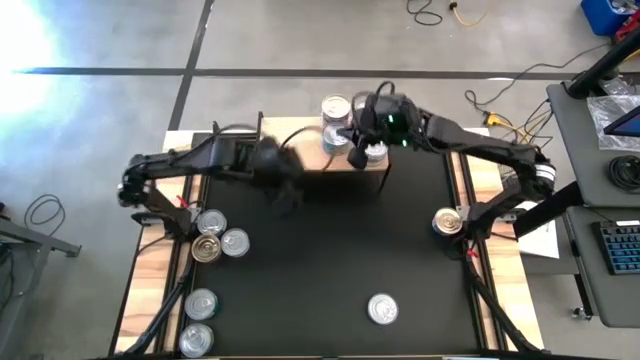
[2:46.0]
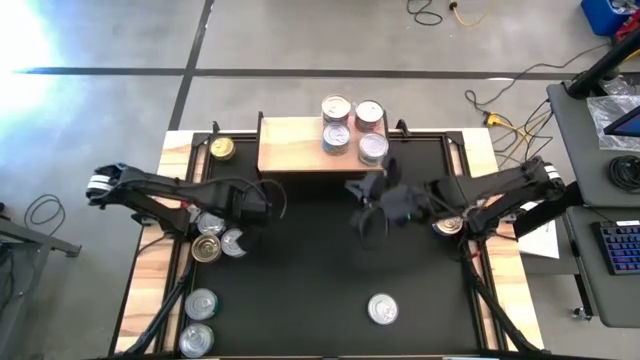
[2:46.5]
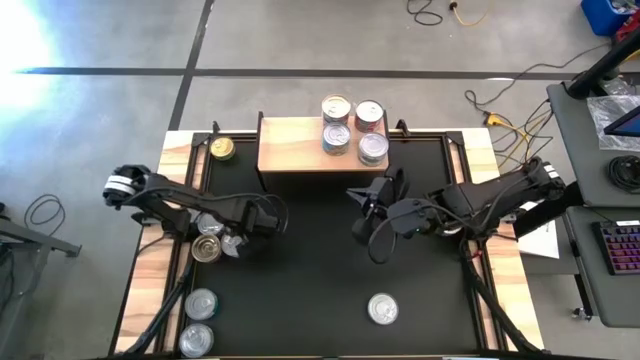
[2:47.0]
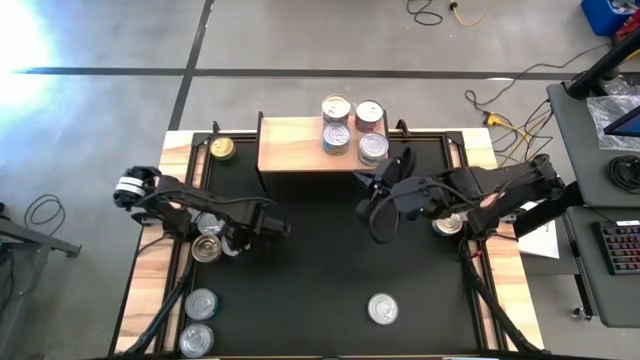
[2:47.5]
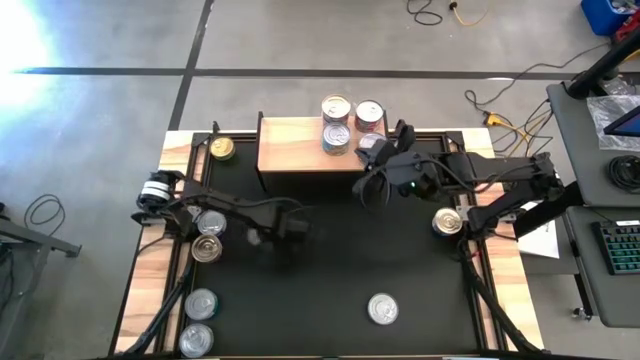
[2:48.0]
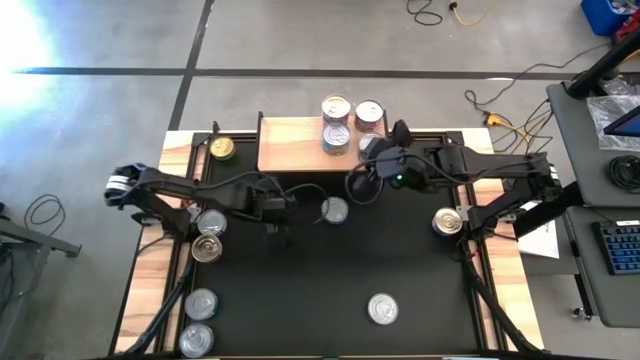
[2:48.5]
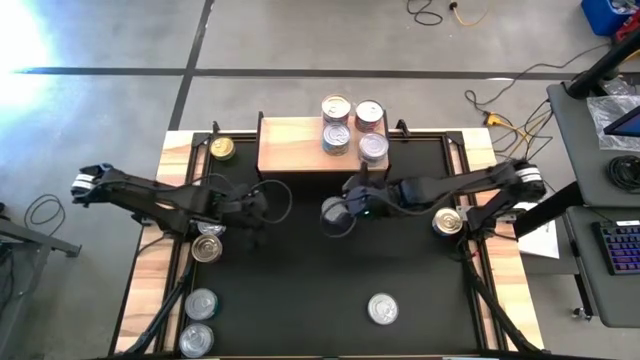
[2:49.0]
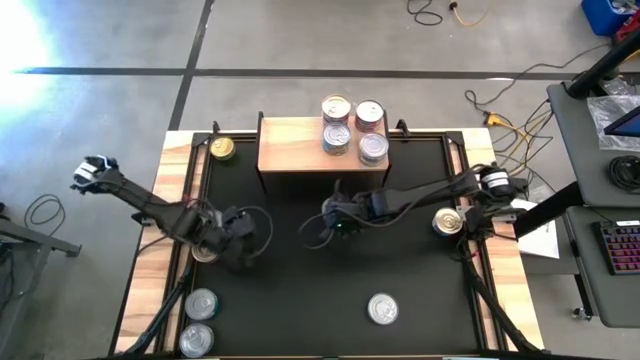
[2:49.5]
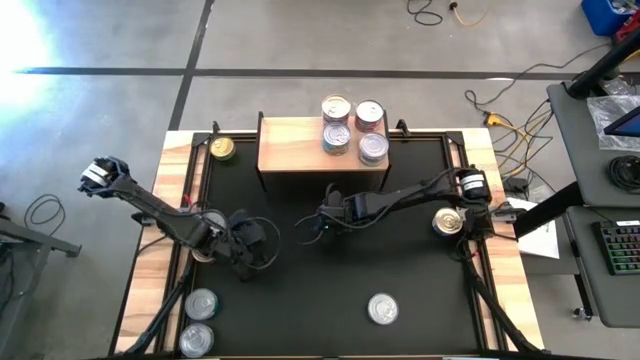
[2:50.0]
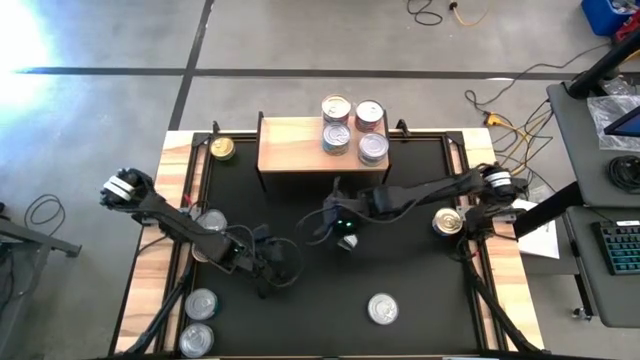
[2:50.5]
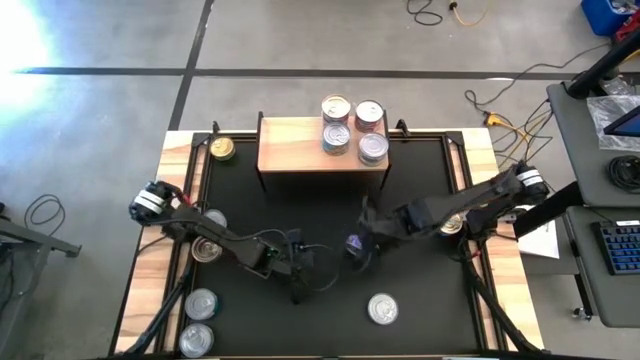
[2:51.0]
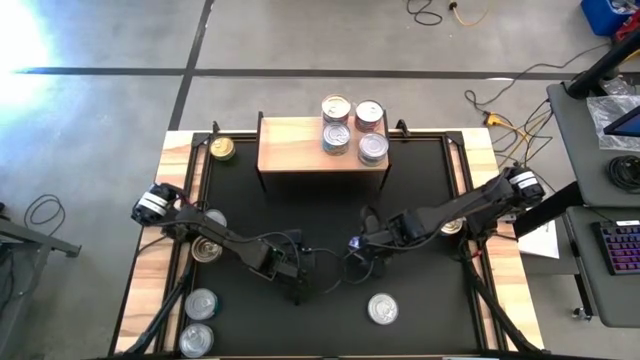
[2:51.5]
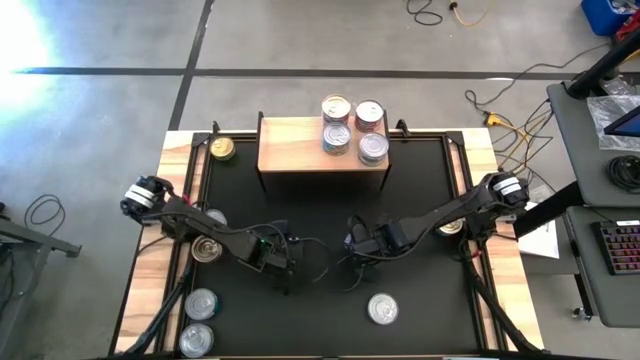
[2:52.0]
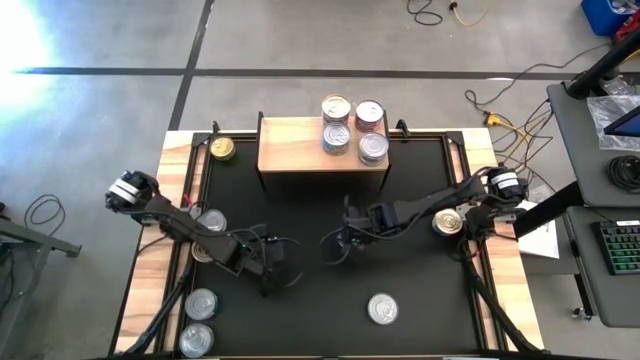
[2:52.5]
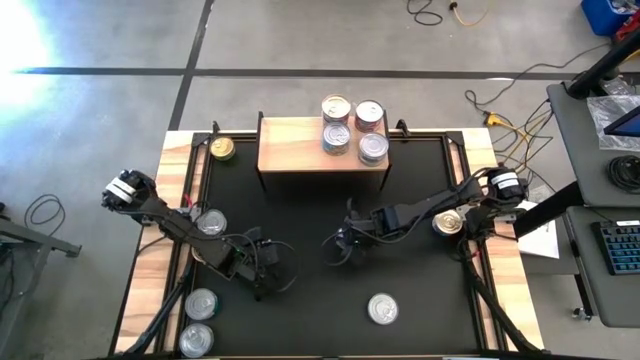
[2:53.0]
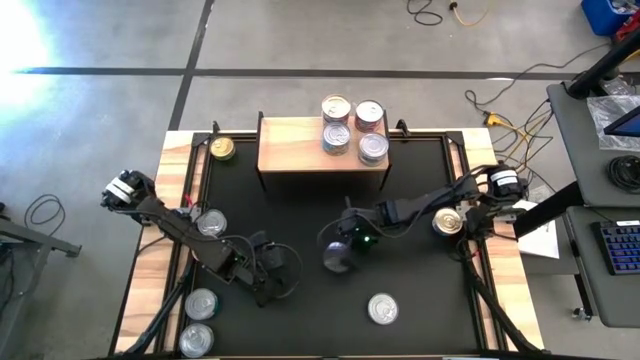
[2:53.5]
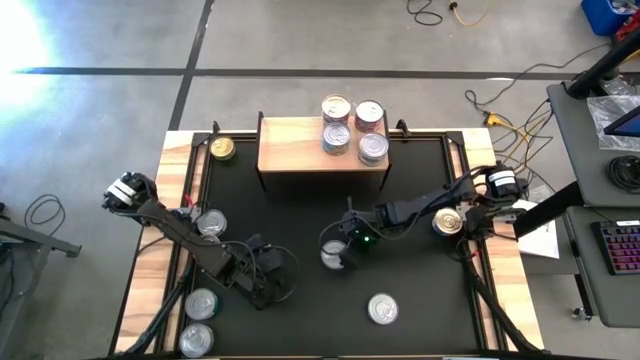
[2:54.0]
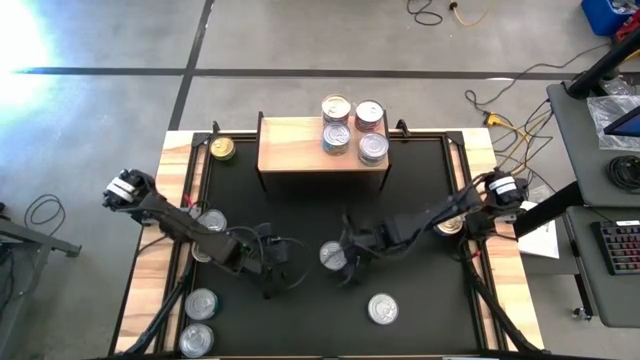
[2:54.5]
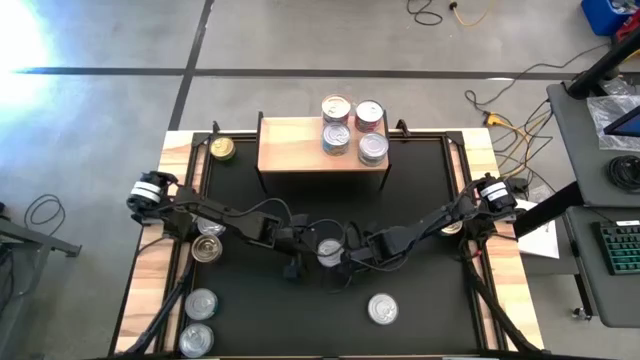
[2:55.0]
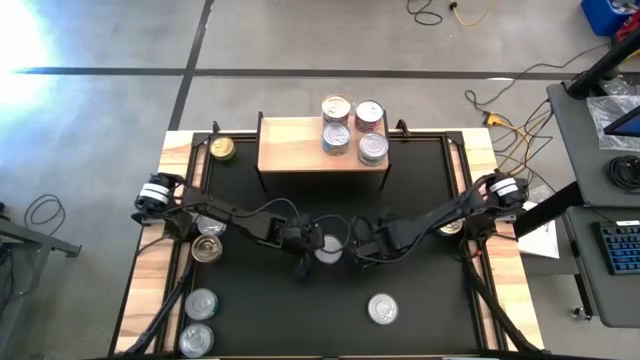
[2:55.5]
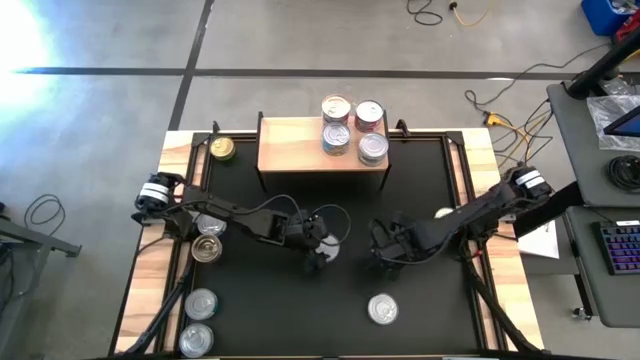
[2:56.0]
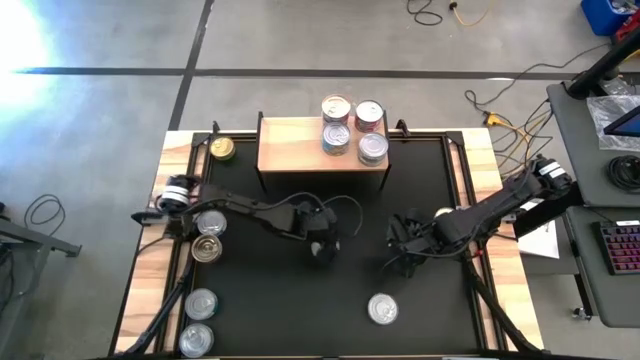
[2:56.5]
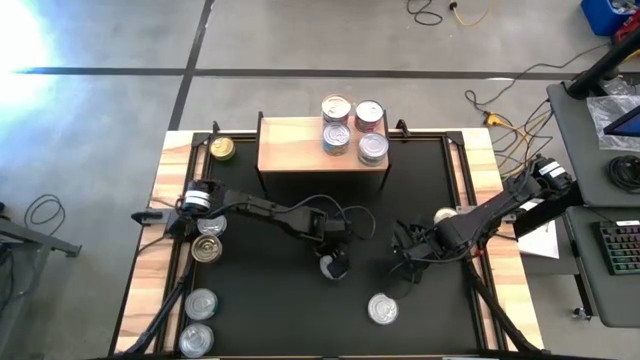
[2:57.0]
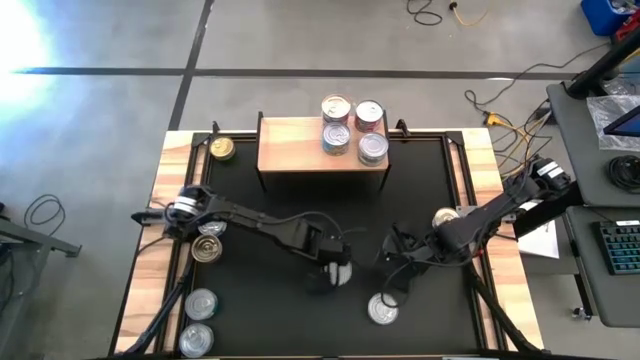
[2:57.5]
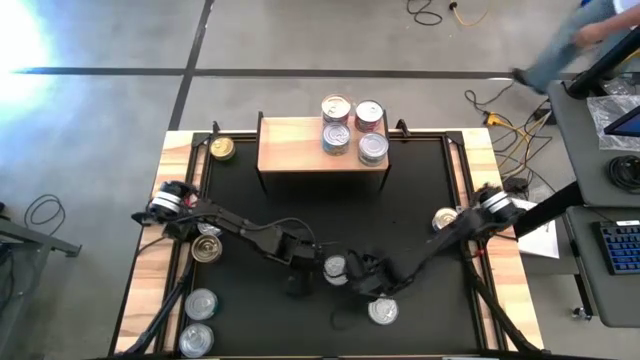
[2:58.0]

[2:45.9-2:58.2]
Task: Stack canned seafood by type on shelf
Put the blue tuna can on the shelf

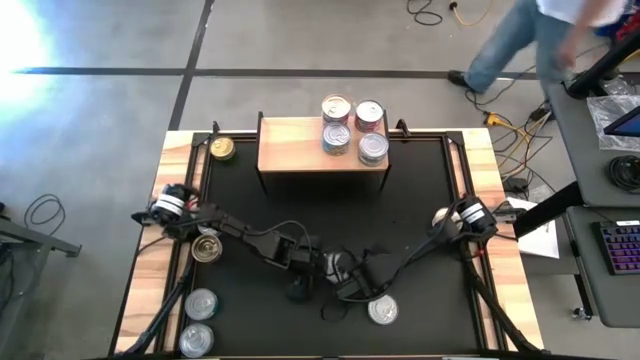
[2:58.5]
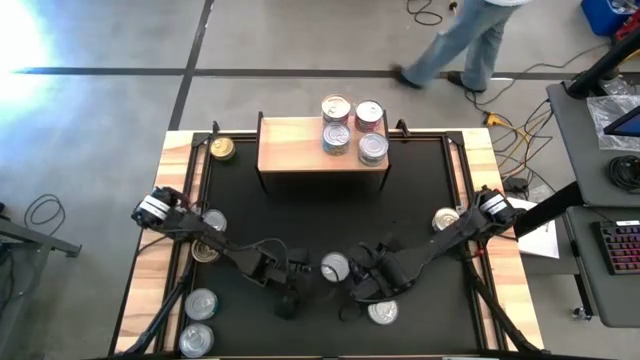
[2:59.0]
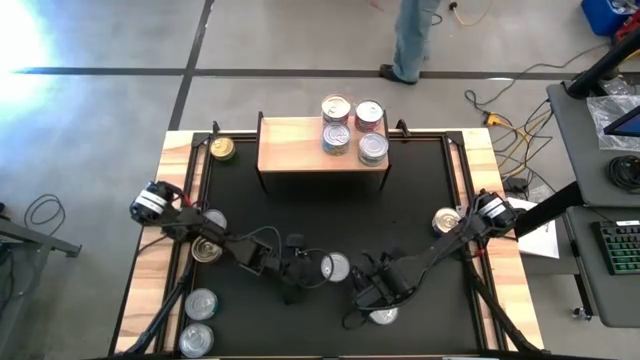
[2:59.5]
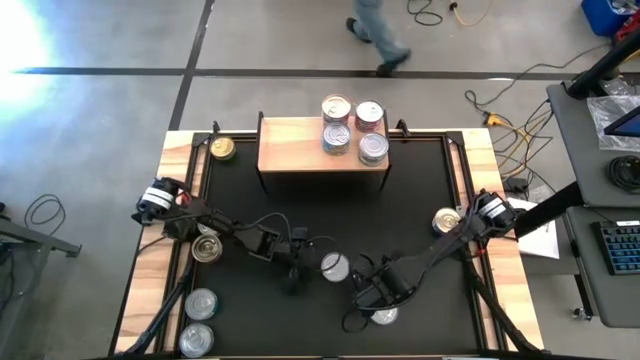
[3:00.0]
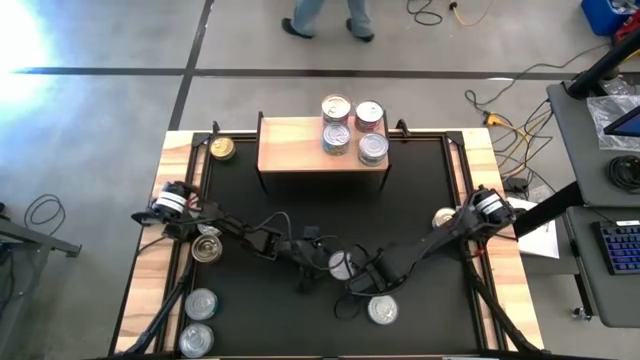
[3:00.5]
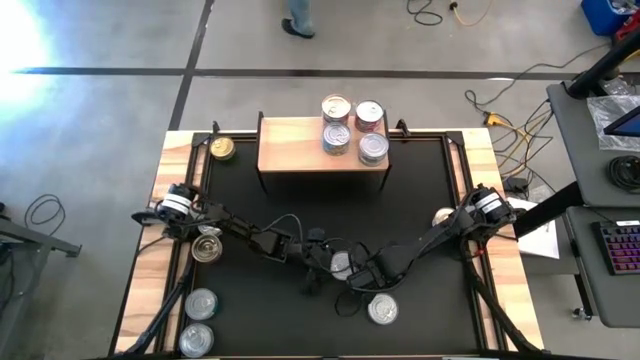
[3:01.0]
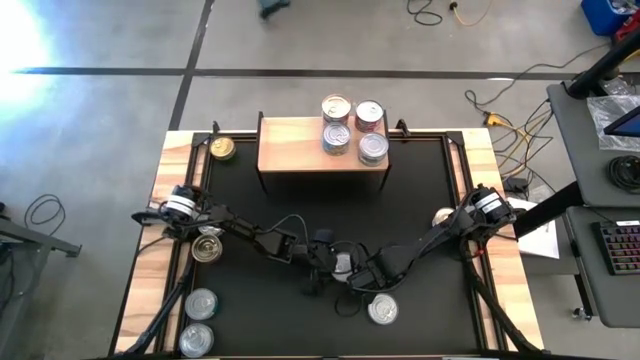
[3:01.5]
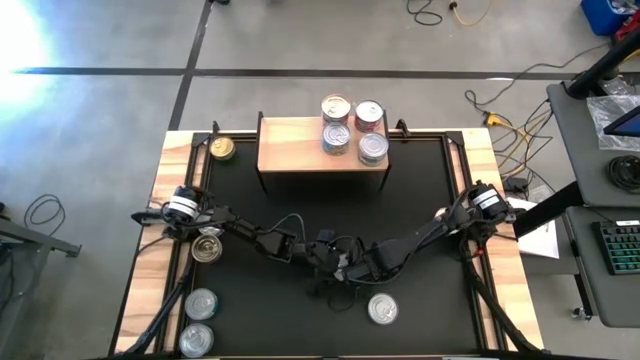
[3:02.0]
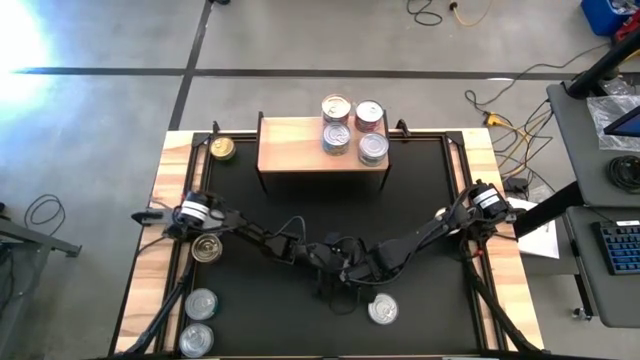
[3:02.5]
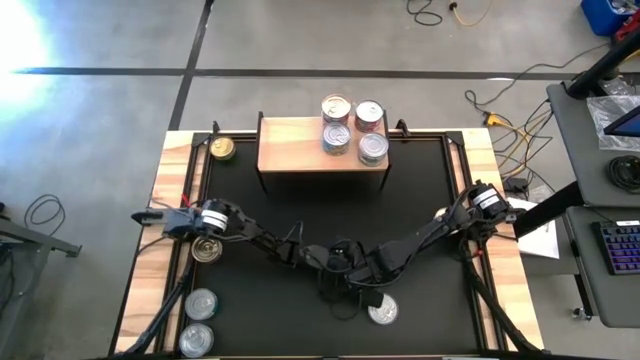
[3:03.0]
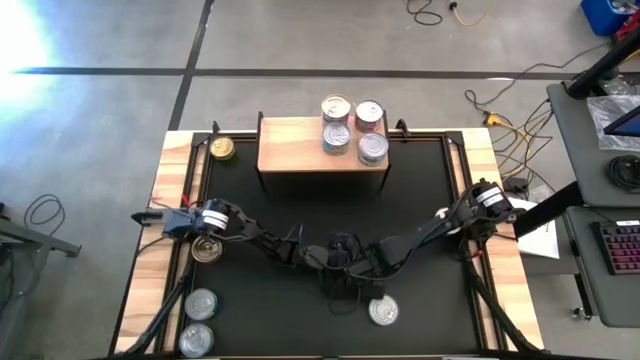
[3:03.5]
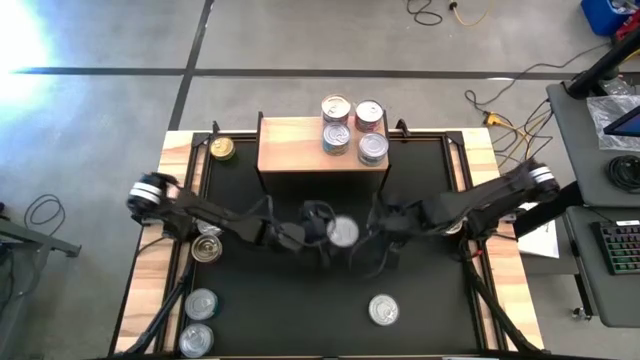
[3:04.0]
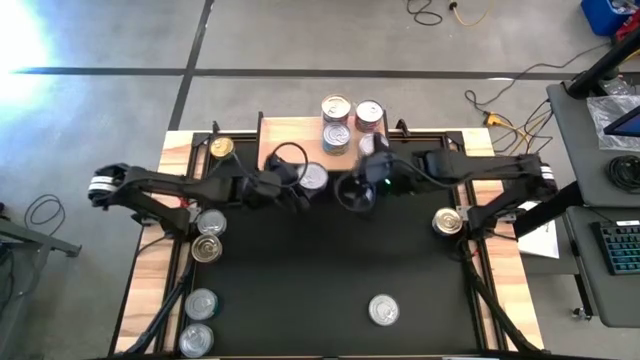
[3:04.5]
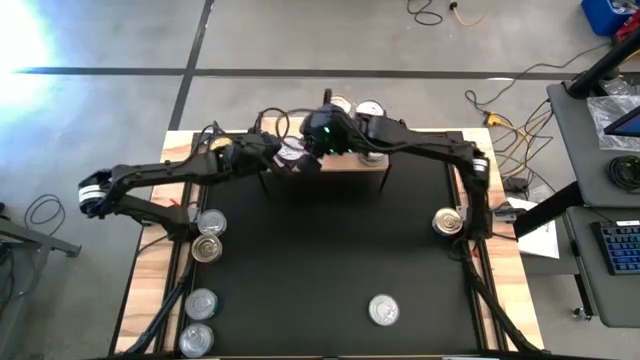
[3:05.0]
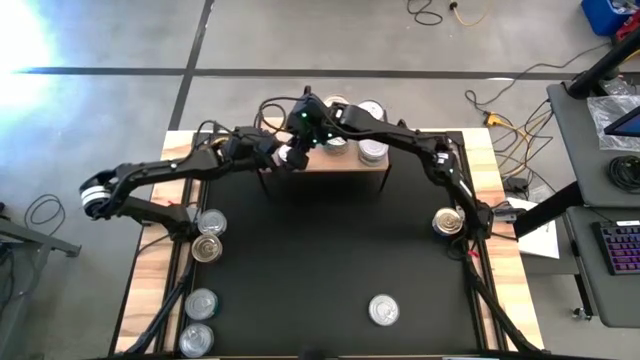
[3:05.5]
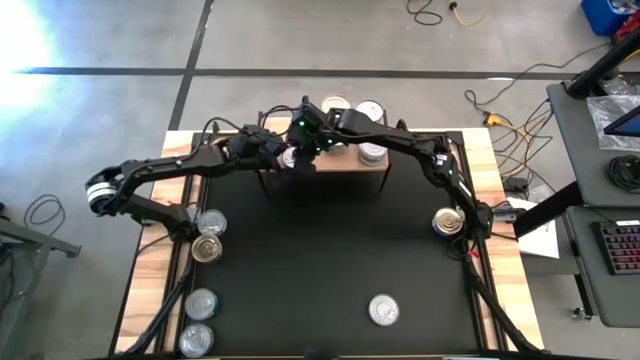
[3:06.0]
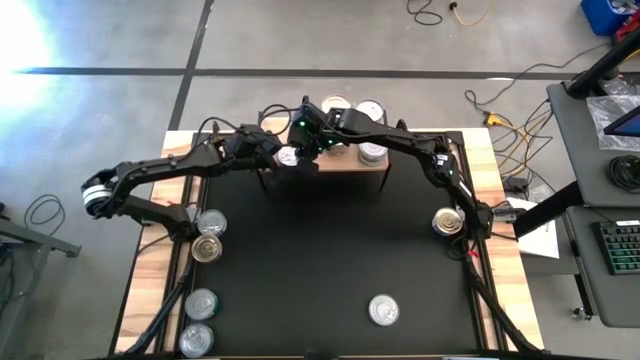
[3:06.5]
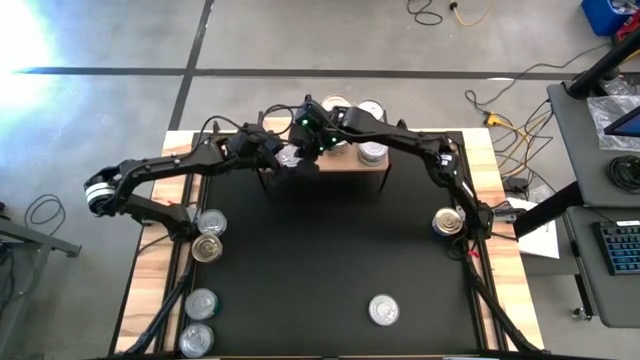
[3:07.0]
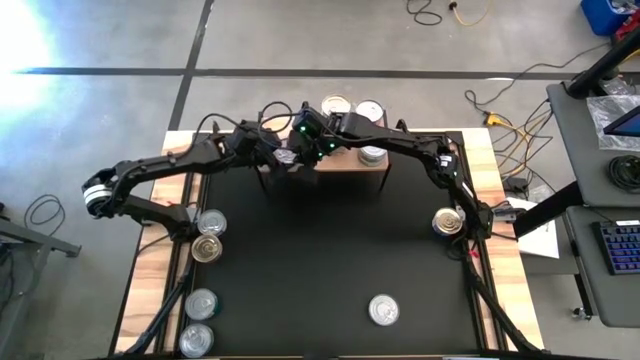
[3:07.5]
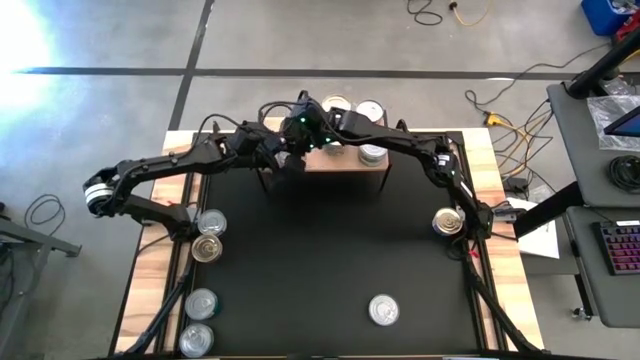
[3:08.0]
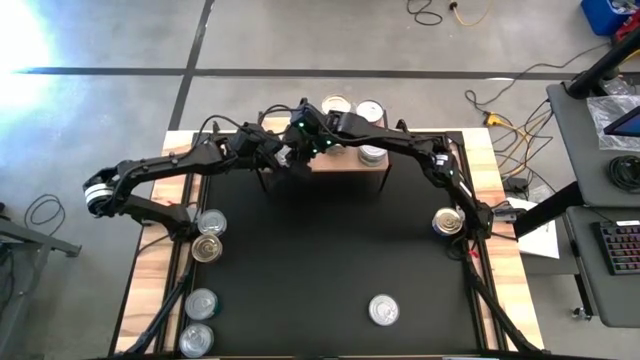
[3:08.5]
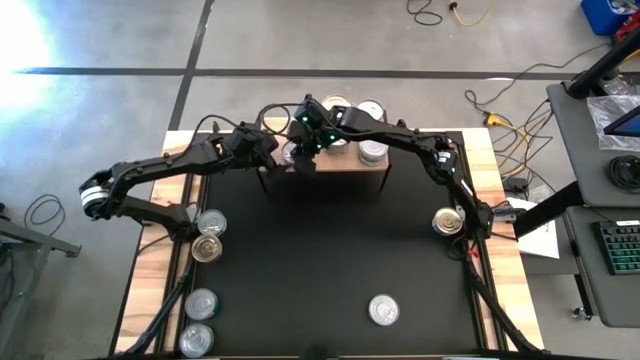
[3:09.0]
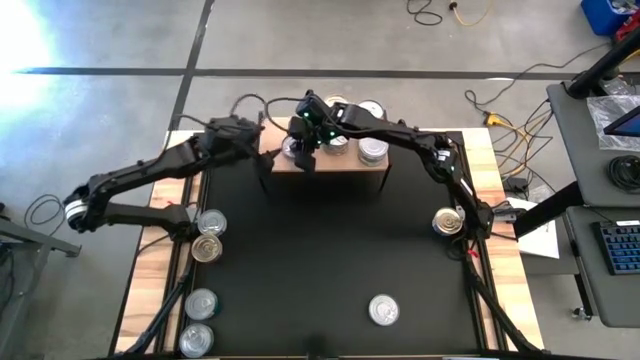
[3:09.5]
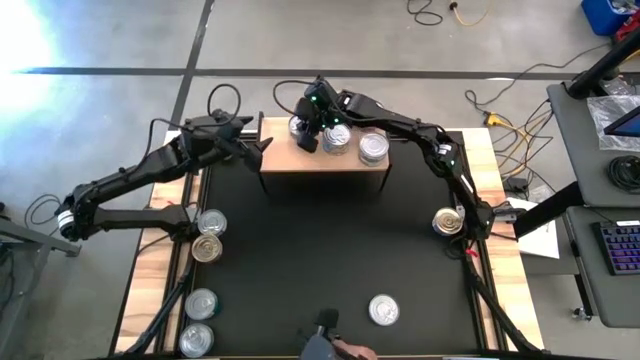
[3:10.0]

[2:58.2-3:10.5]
Put the blue tuna can on the shelf
